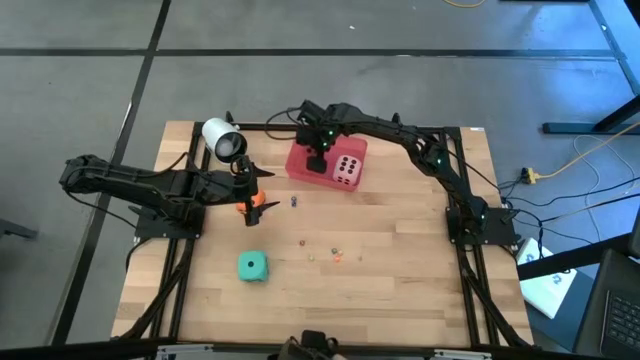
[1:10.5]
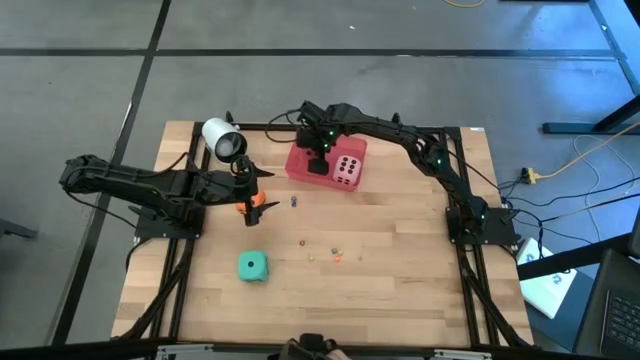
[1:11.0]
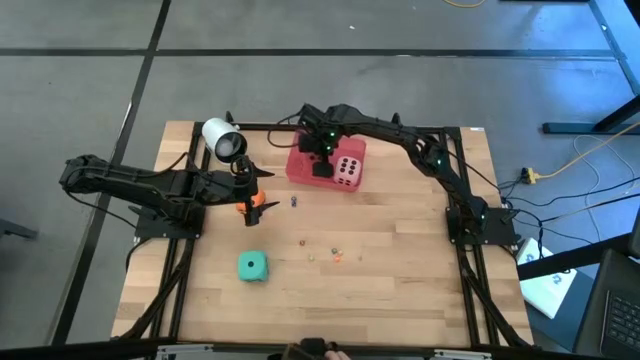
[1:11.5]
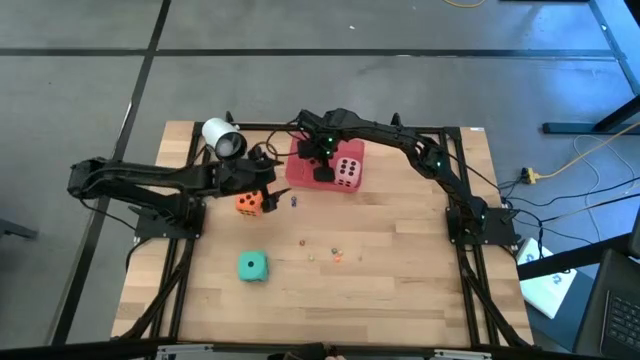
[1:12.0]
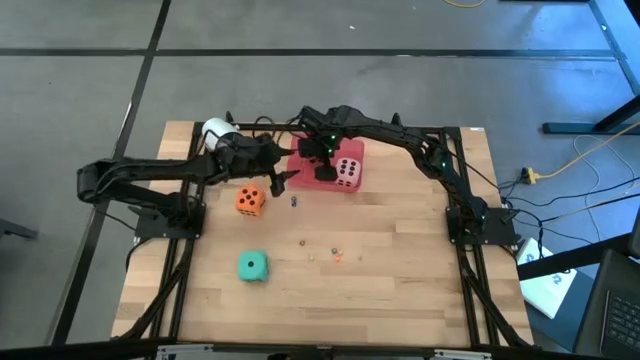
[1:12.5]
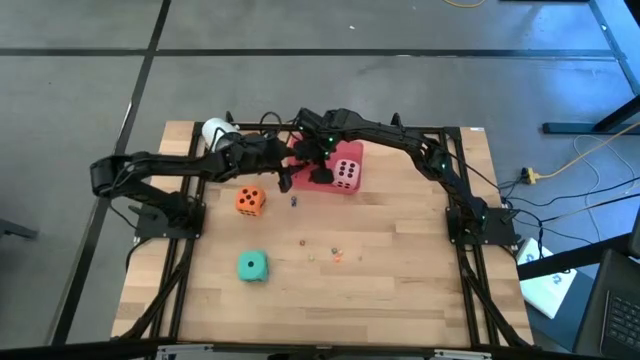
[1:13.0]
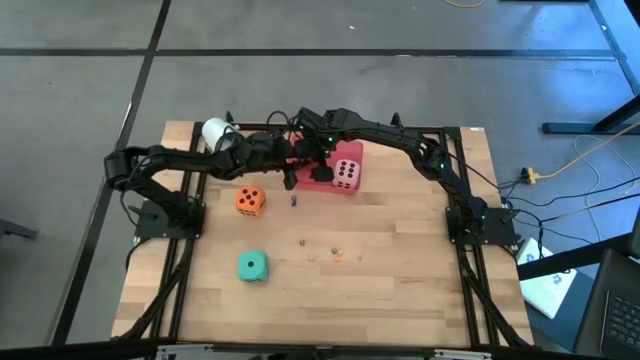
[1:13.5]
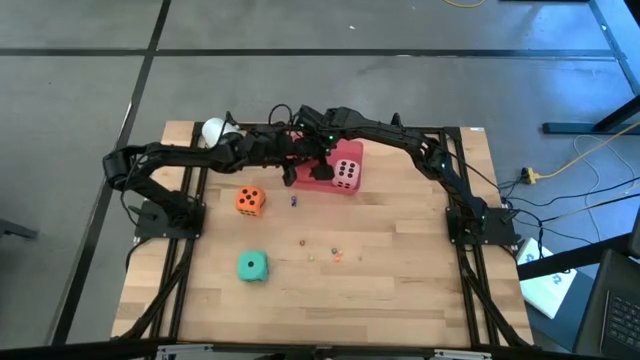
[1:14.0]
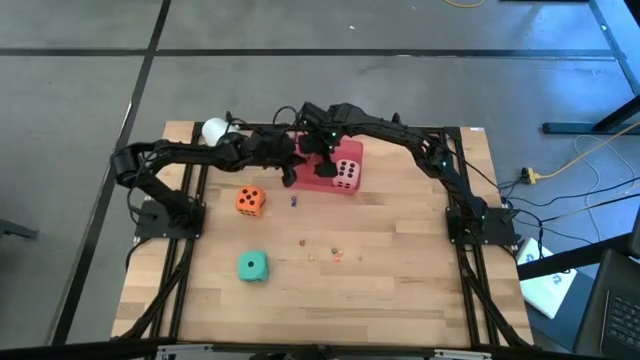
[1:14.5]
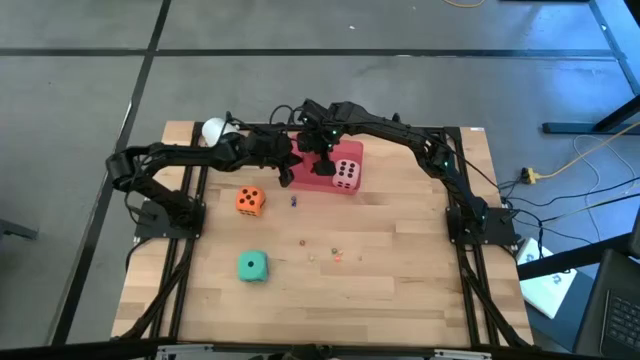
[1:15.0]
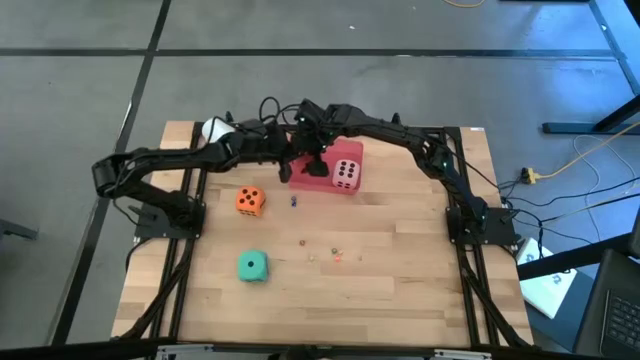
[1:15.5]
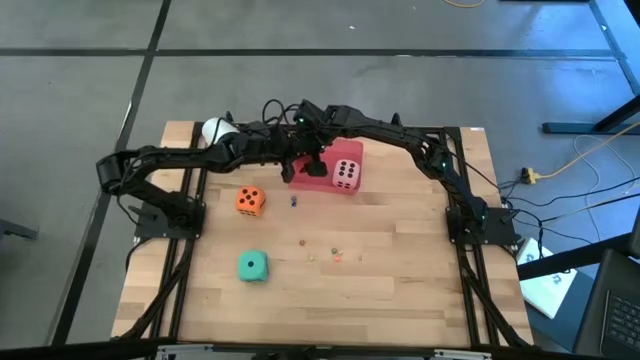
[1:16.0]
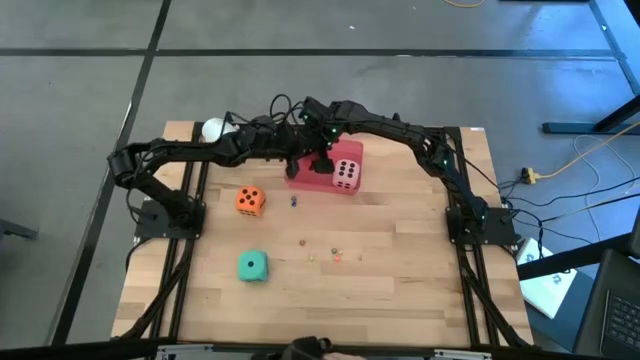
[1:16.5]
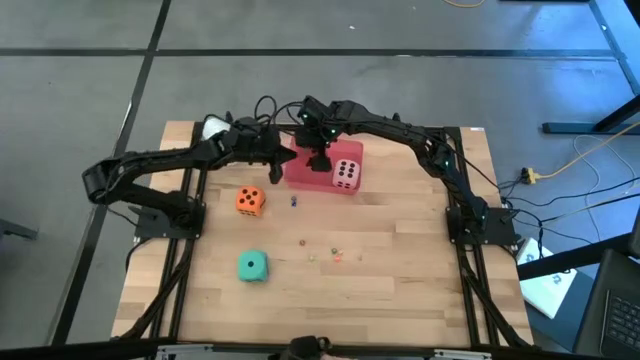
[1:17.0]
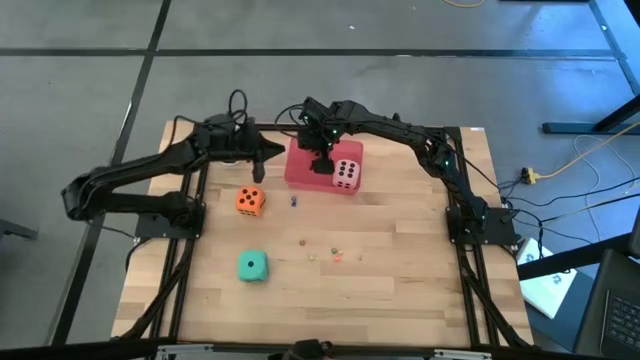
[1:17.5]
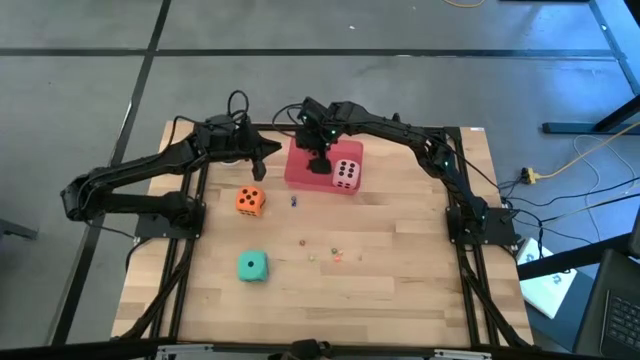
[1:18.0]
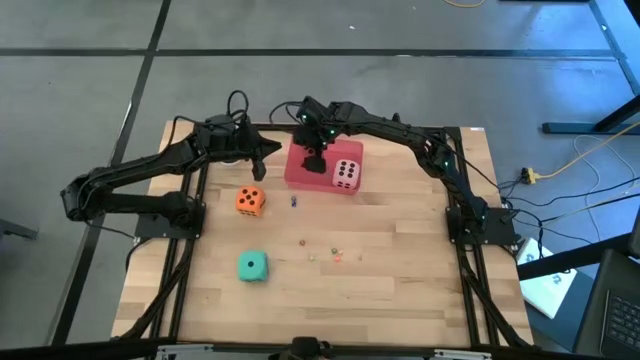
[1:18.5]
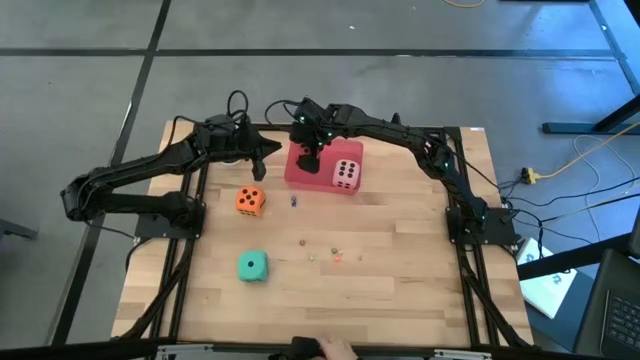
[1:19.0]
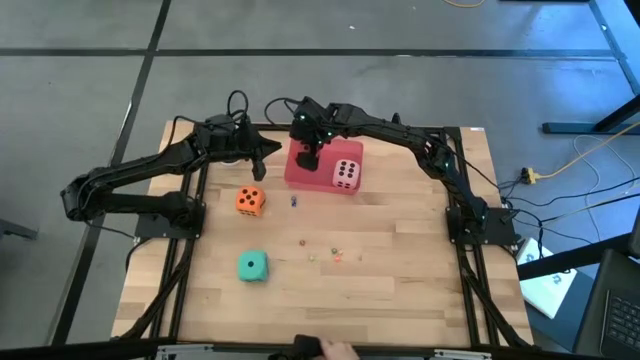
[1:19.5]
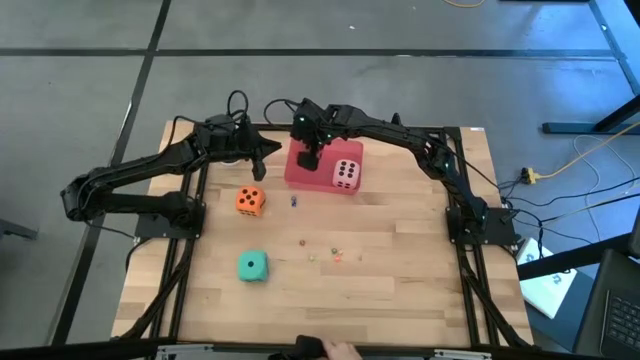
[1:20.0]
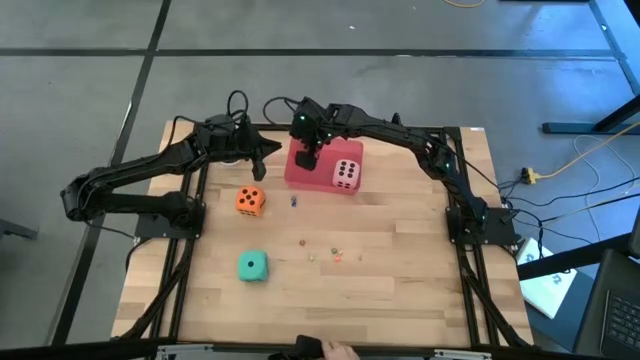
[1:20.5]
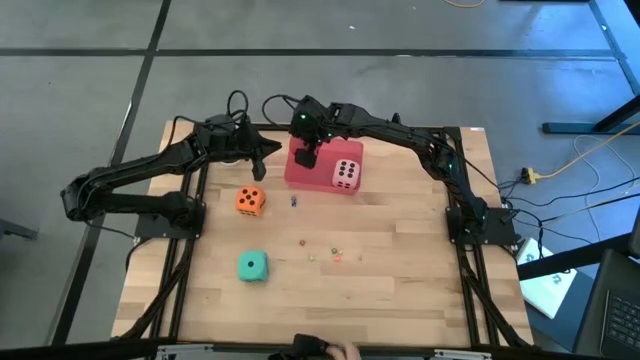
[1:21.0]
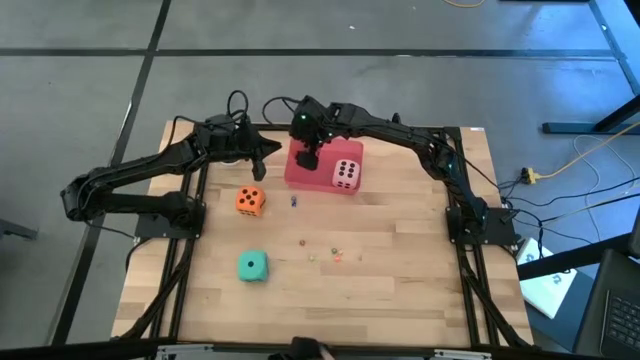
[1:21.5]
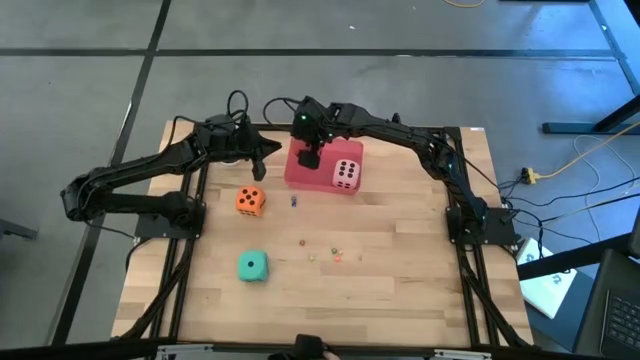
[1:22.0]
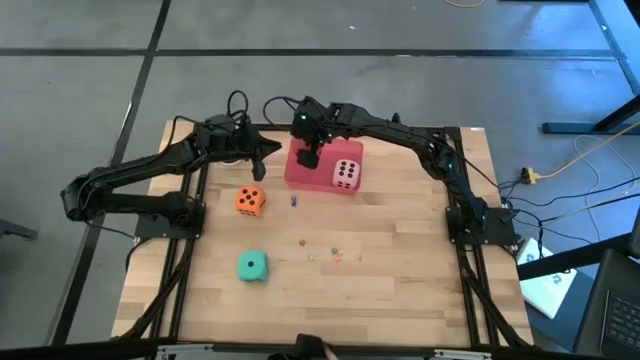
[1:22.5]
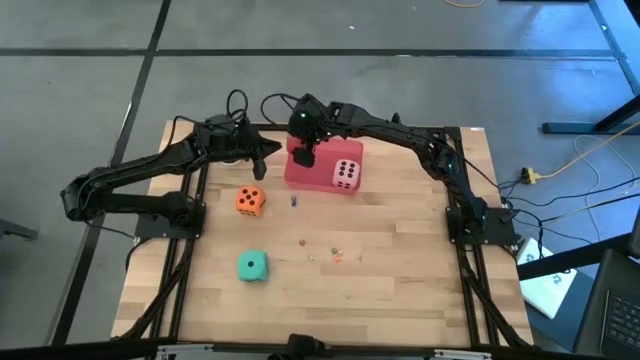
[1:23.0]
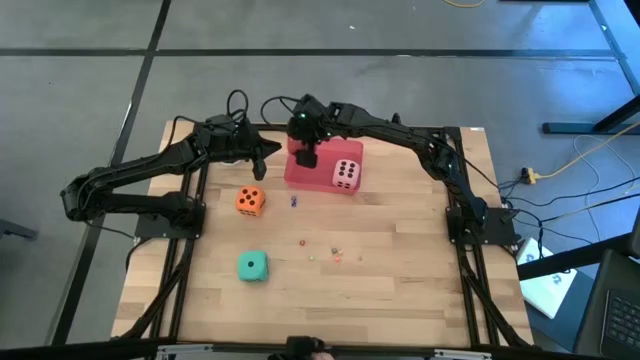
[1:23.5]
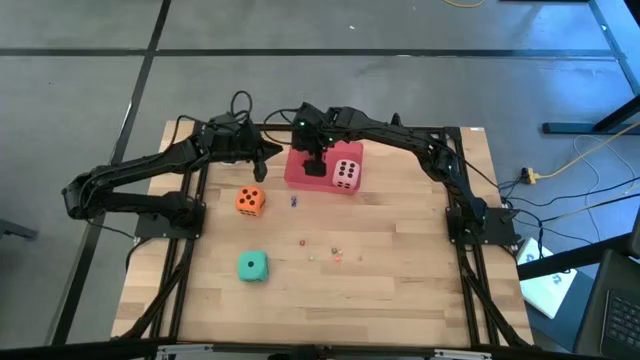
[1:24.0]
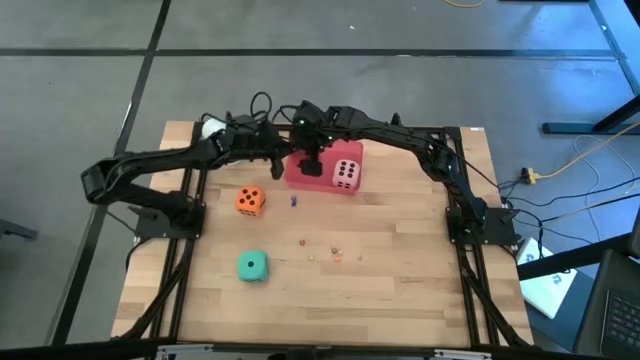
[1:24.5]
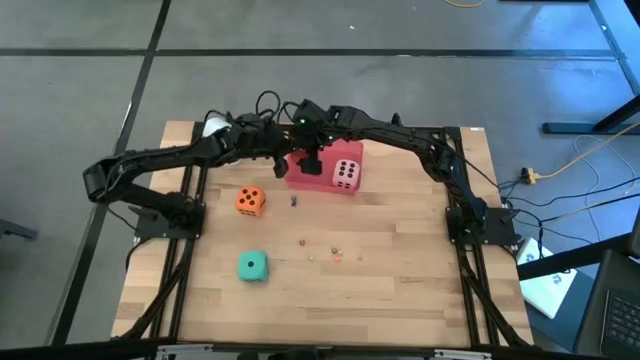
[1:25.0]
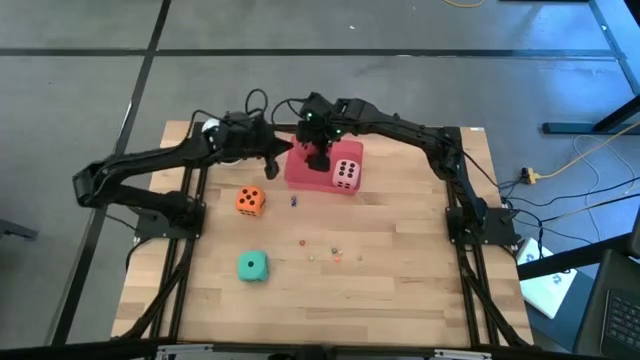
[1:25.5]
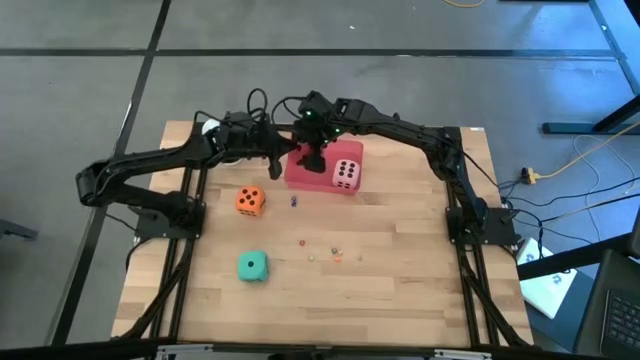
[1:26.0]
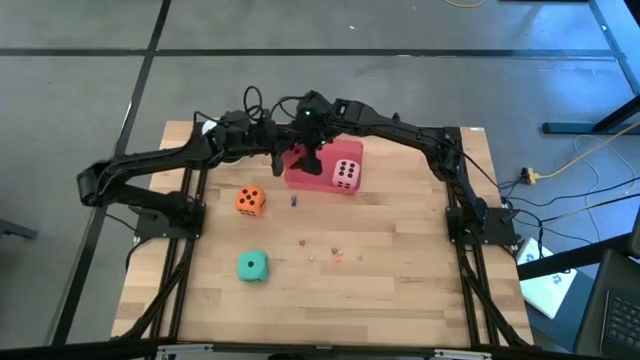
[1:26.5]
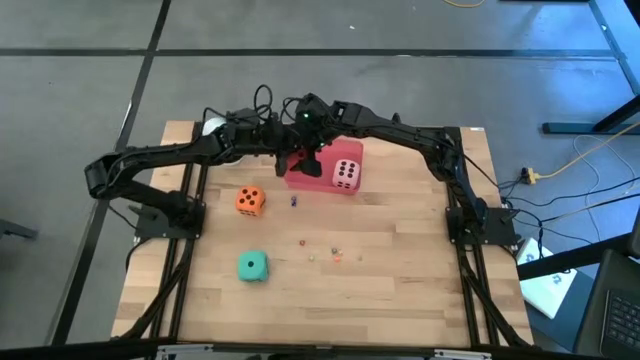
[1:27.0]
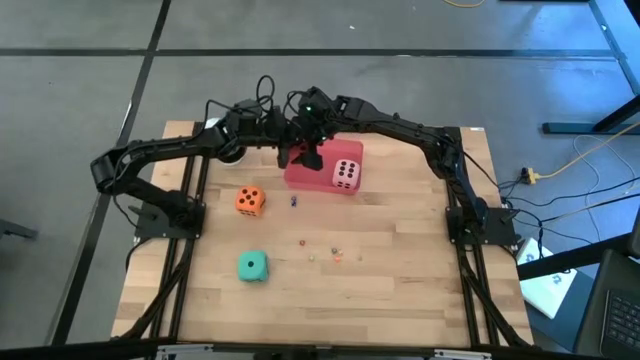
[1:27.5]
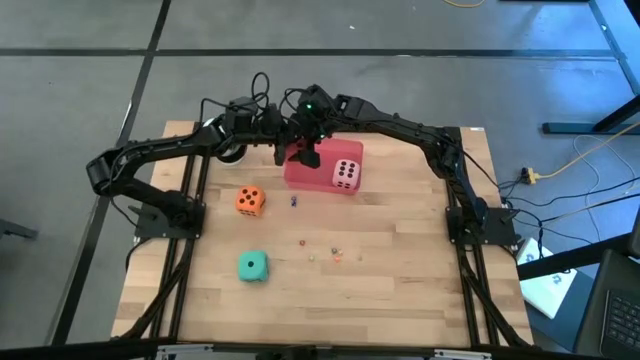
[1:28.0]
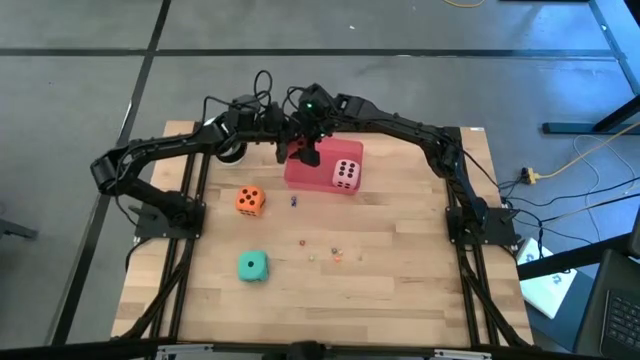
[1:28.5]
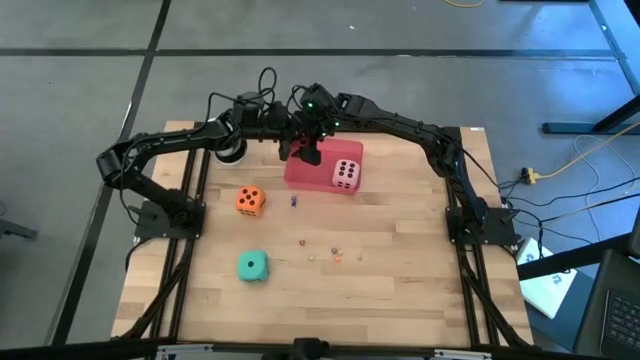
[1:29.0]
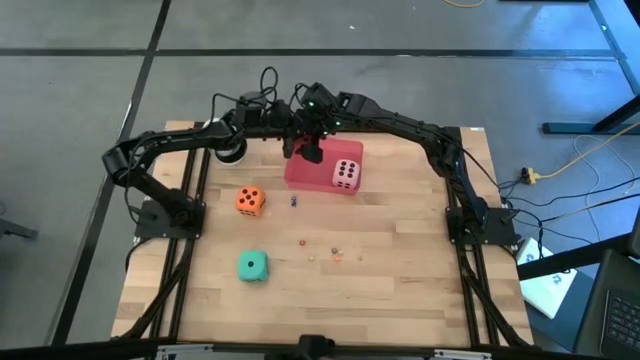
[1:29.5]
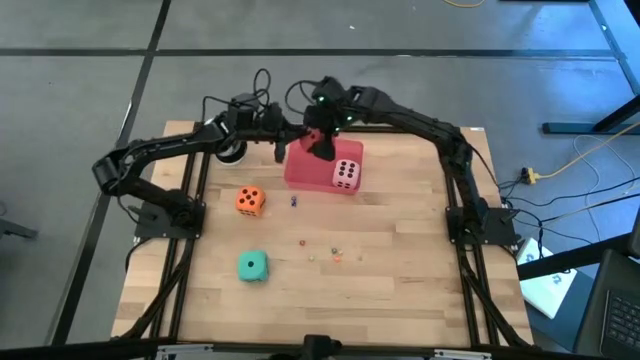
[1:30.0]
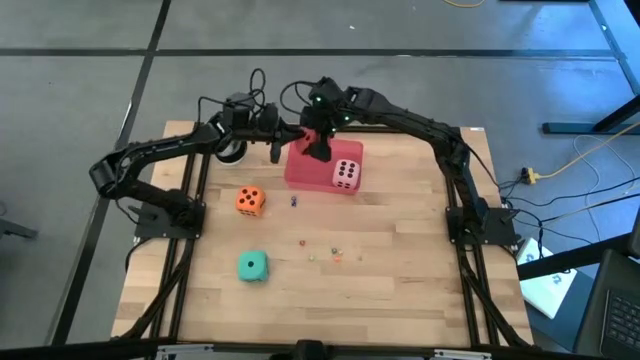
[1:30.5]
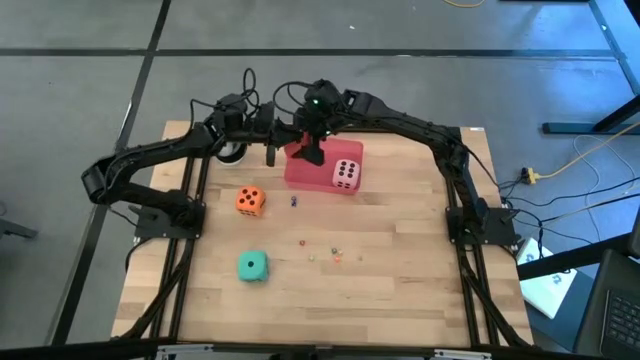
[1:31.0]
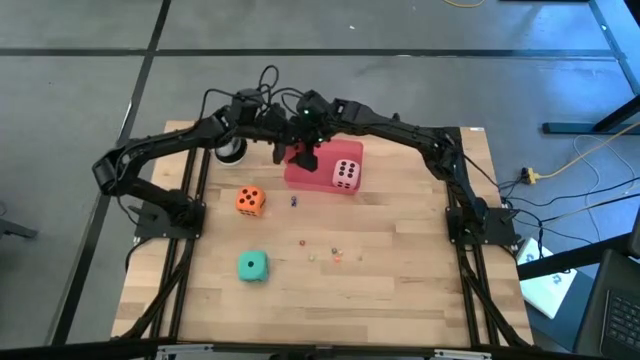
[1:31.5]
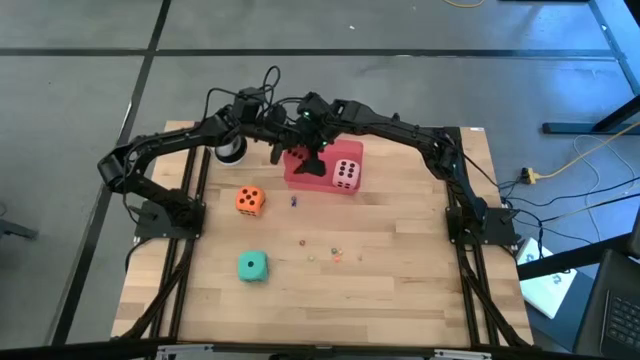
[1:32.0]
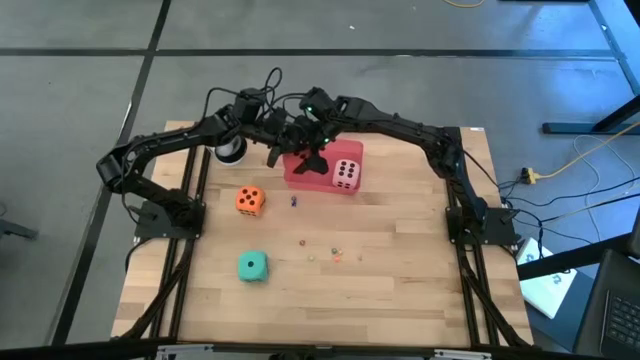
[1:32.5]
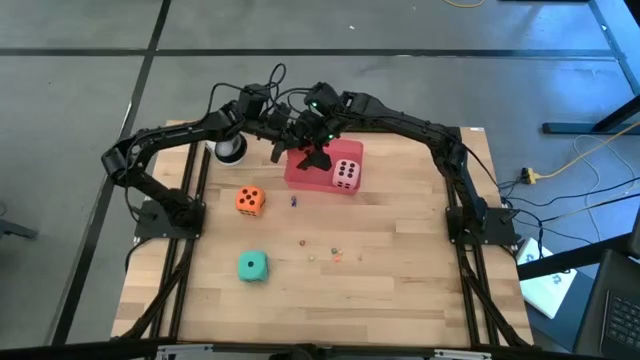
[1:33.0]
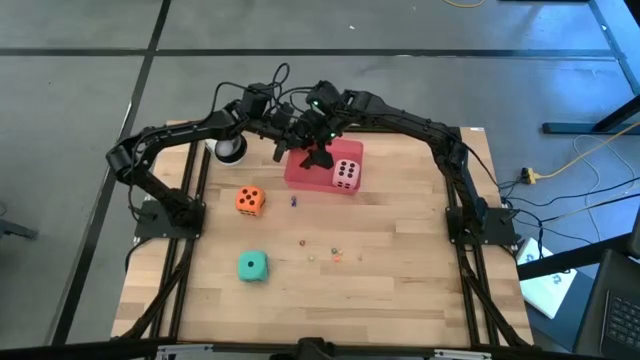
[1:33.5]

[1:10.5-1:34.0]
Task: Pick & Place Dice
Put the big red dice into the pink bin
